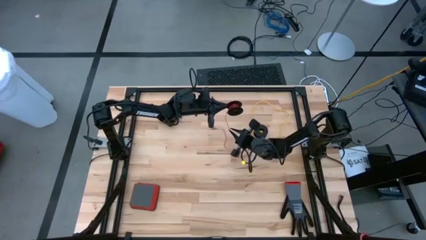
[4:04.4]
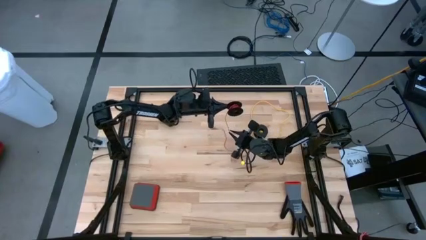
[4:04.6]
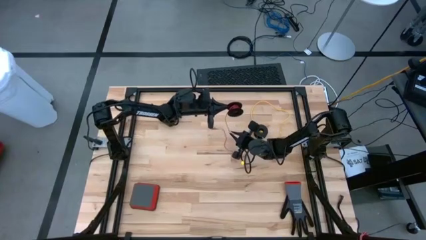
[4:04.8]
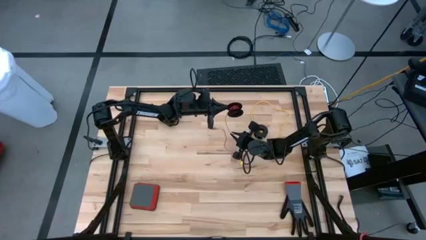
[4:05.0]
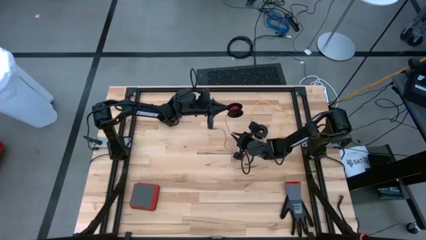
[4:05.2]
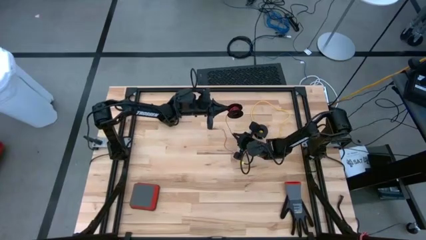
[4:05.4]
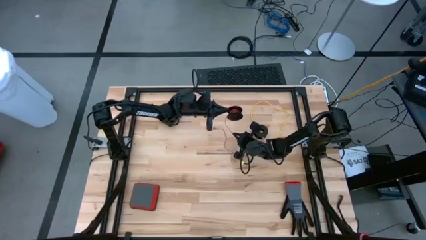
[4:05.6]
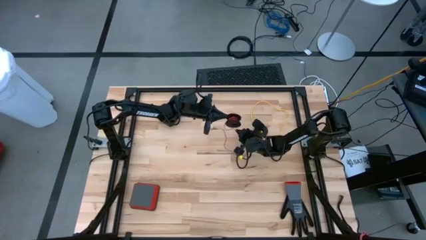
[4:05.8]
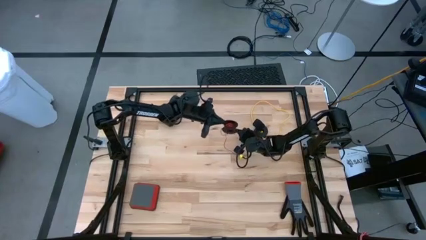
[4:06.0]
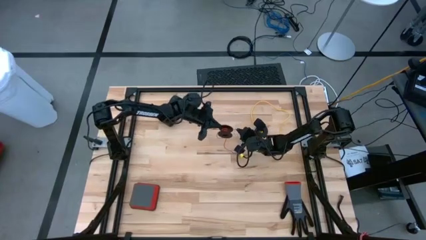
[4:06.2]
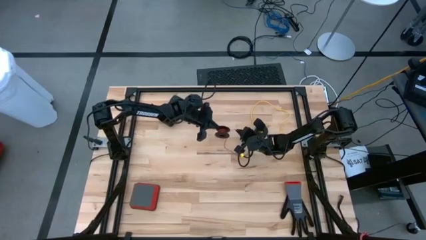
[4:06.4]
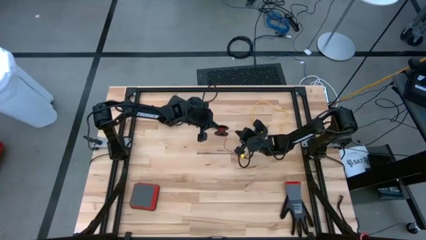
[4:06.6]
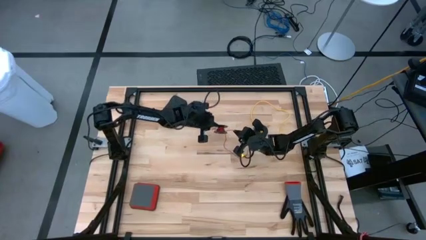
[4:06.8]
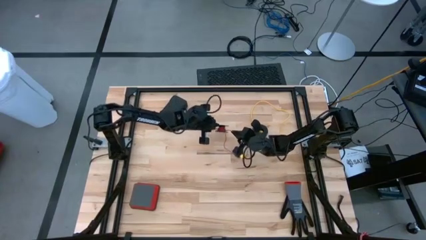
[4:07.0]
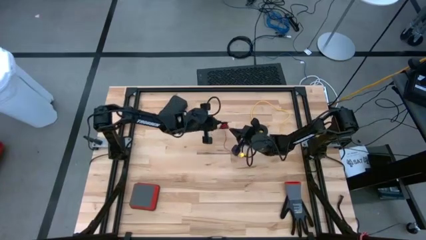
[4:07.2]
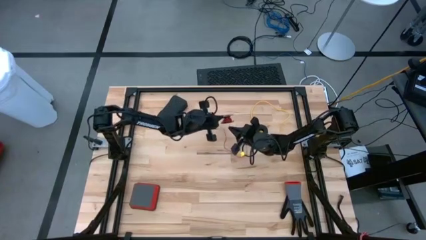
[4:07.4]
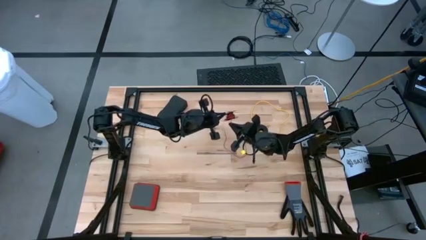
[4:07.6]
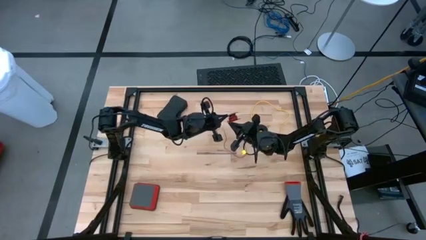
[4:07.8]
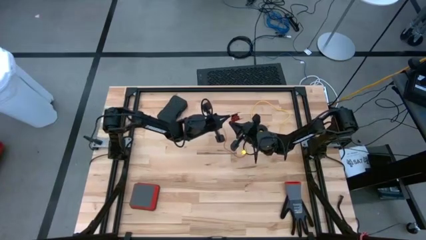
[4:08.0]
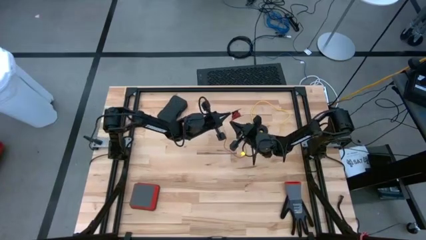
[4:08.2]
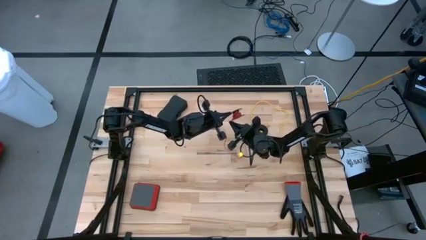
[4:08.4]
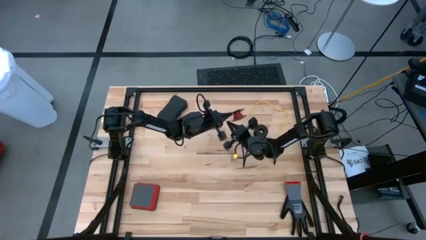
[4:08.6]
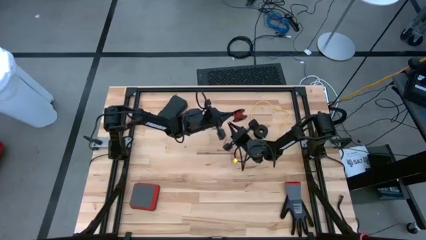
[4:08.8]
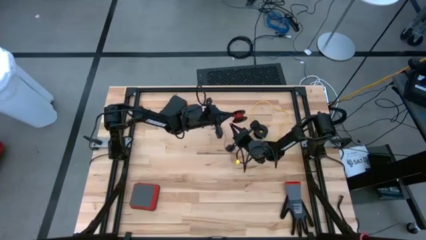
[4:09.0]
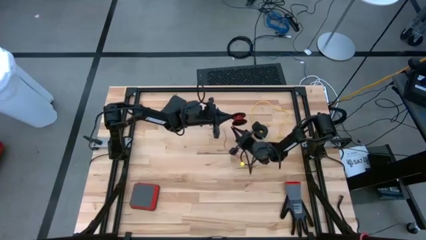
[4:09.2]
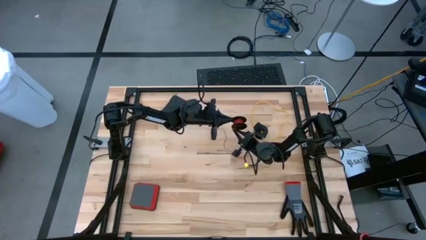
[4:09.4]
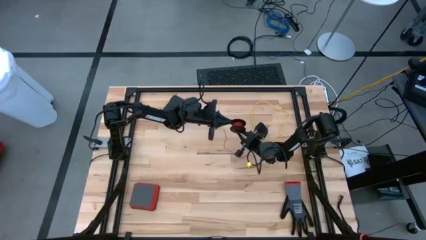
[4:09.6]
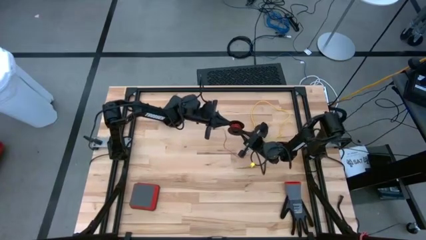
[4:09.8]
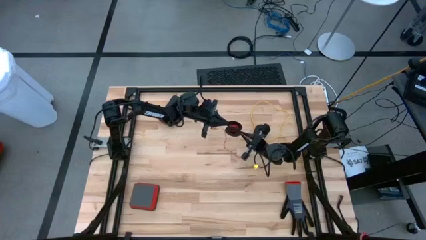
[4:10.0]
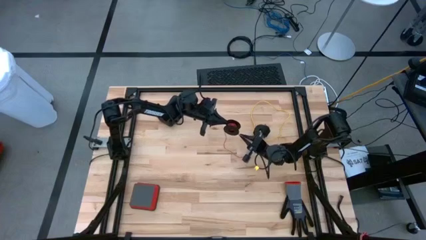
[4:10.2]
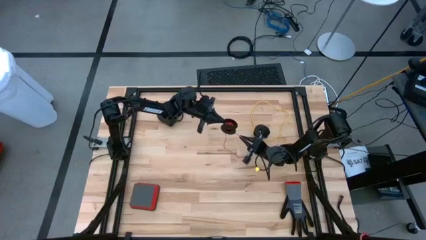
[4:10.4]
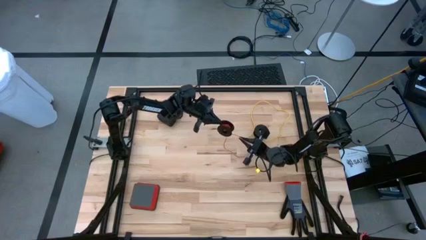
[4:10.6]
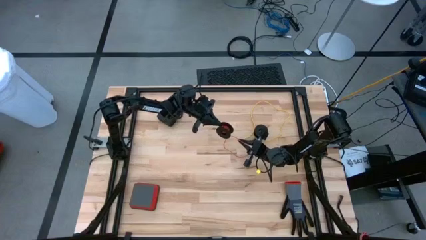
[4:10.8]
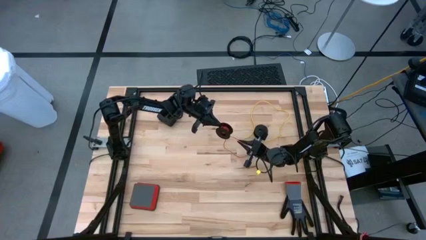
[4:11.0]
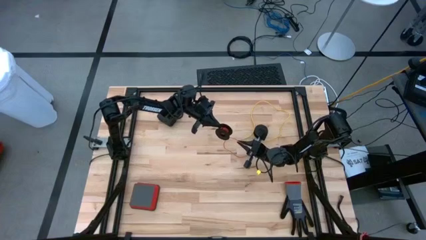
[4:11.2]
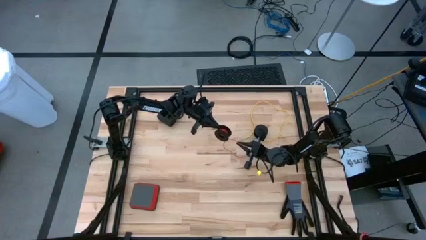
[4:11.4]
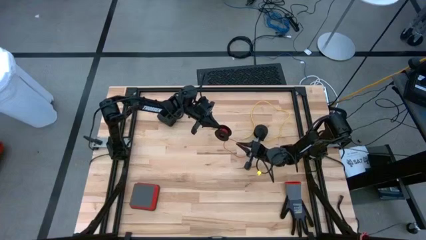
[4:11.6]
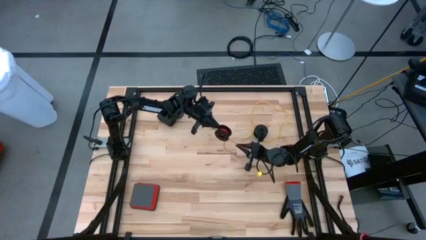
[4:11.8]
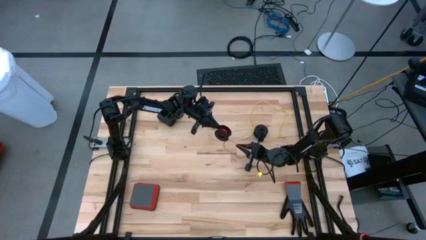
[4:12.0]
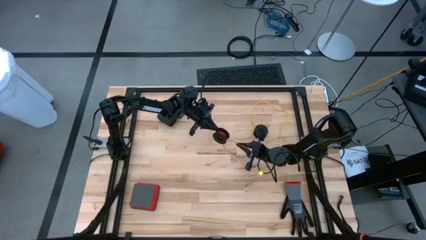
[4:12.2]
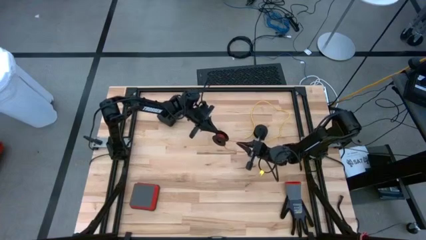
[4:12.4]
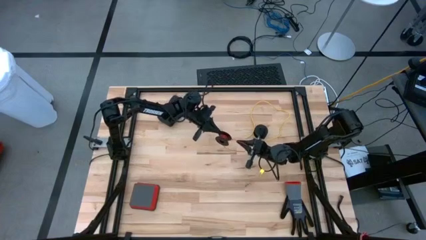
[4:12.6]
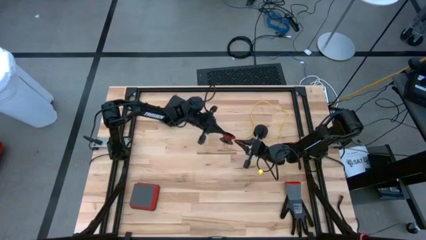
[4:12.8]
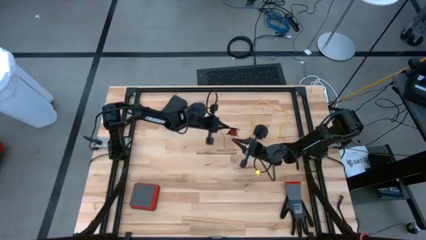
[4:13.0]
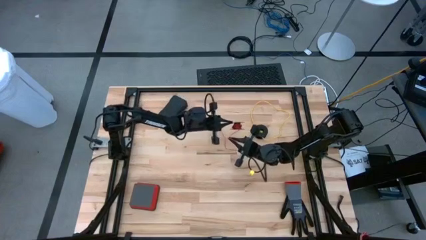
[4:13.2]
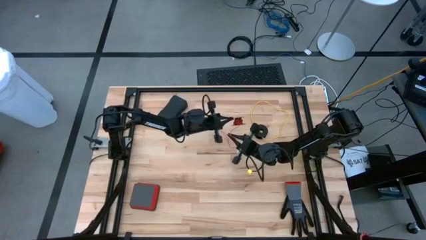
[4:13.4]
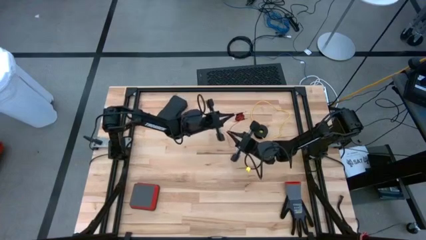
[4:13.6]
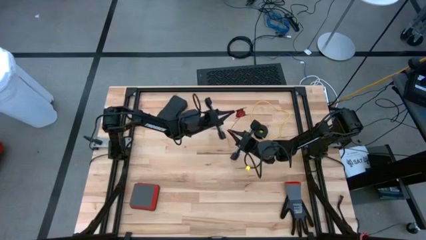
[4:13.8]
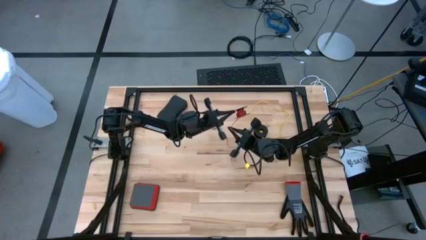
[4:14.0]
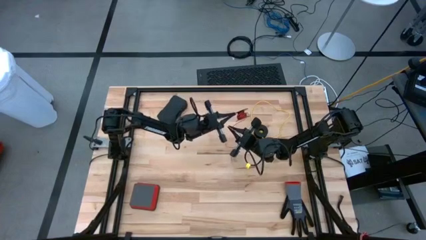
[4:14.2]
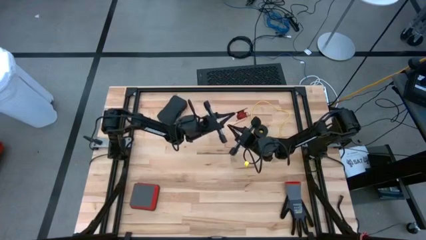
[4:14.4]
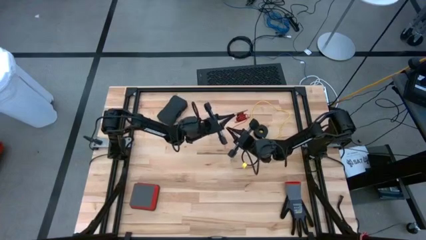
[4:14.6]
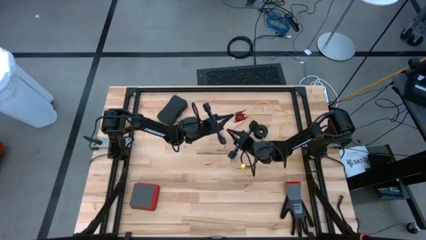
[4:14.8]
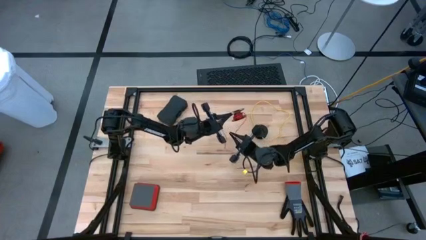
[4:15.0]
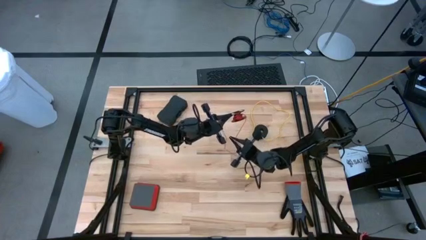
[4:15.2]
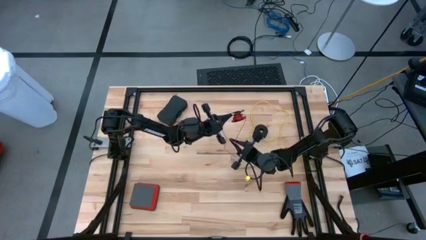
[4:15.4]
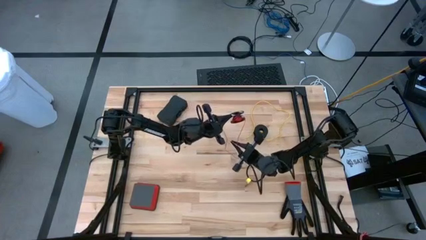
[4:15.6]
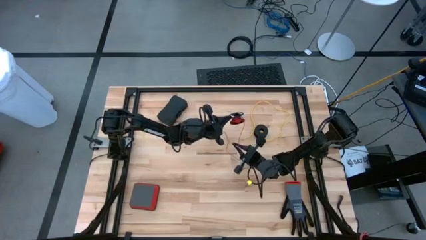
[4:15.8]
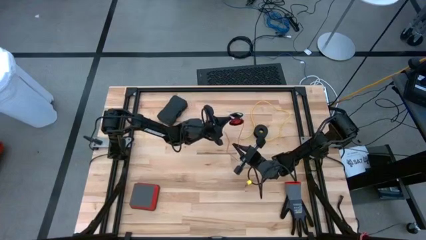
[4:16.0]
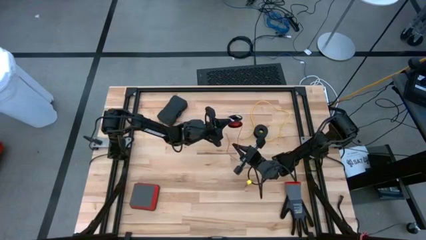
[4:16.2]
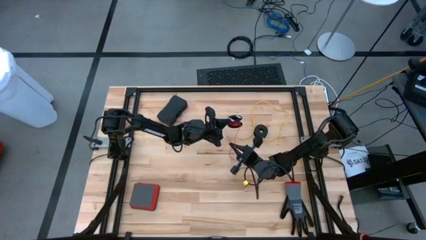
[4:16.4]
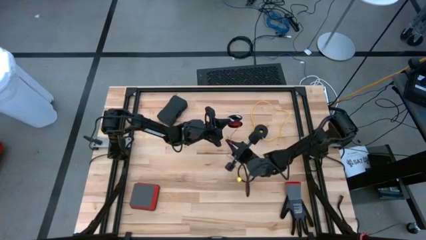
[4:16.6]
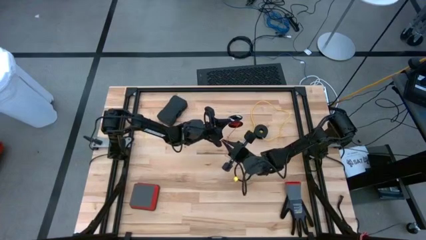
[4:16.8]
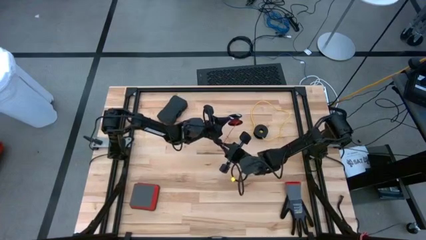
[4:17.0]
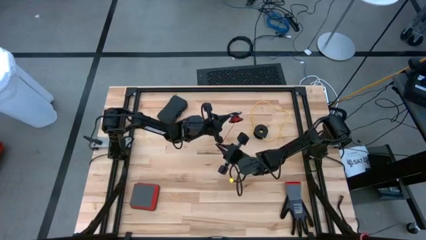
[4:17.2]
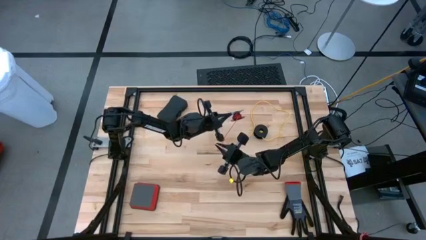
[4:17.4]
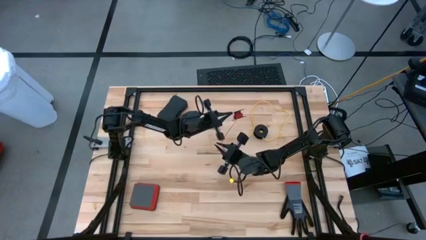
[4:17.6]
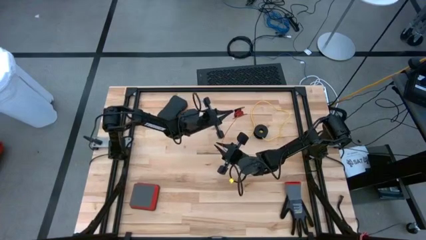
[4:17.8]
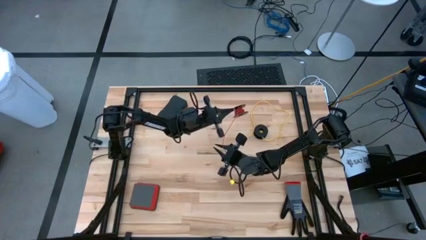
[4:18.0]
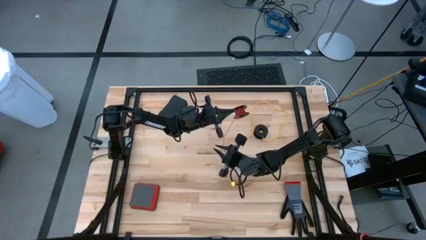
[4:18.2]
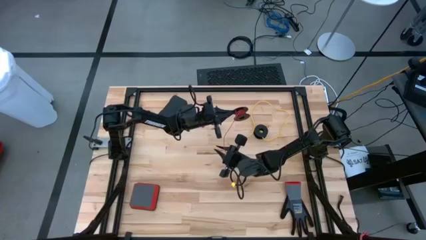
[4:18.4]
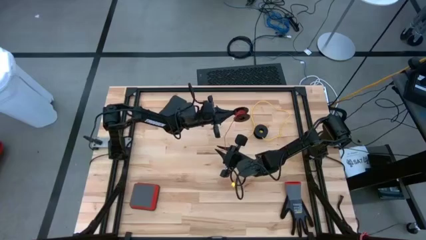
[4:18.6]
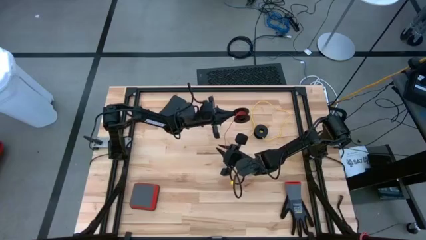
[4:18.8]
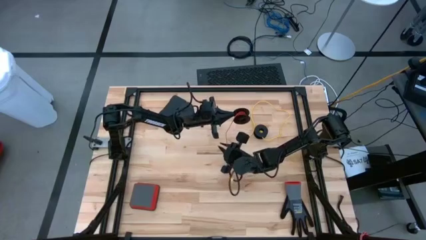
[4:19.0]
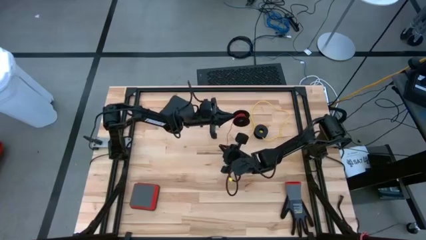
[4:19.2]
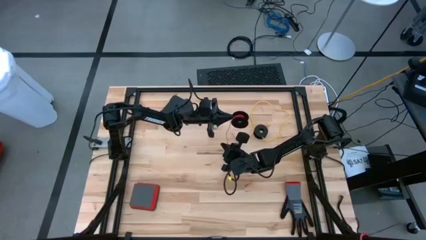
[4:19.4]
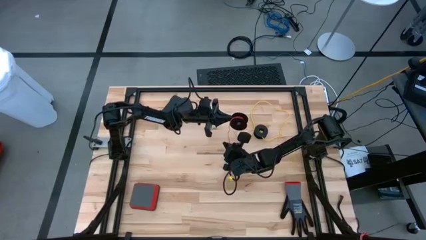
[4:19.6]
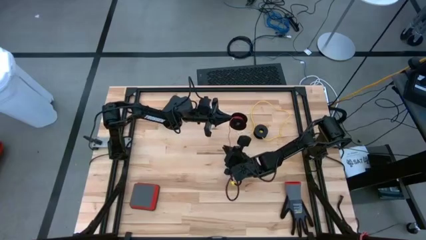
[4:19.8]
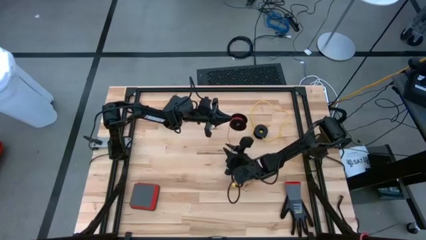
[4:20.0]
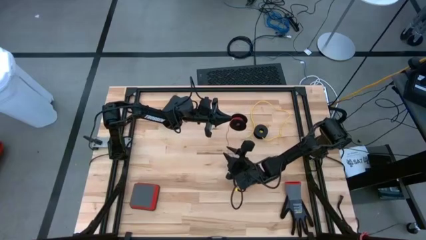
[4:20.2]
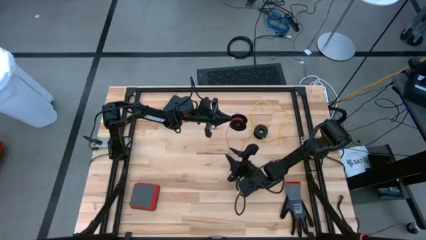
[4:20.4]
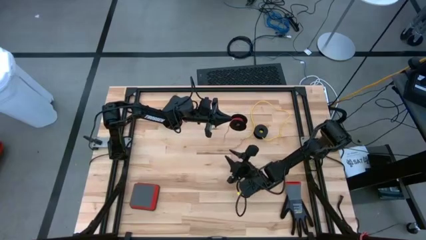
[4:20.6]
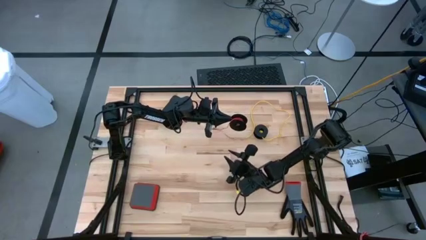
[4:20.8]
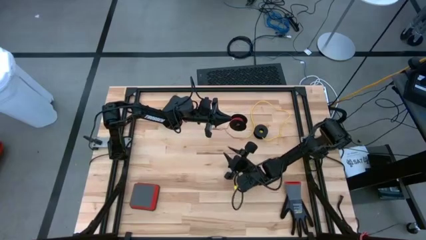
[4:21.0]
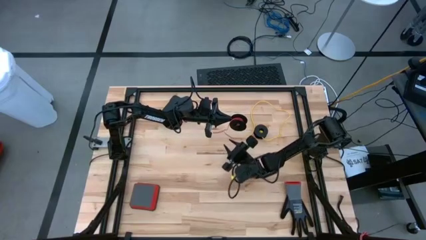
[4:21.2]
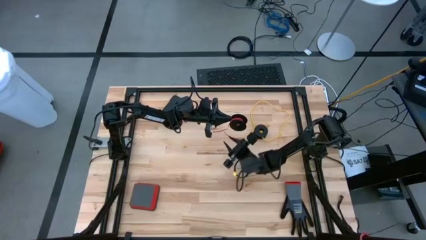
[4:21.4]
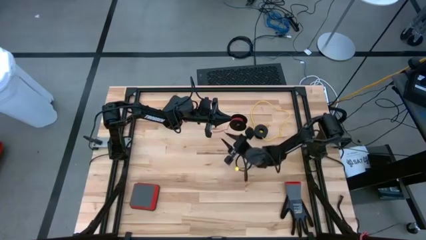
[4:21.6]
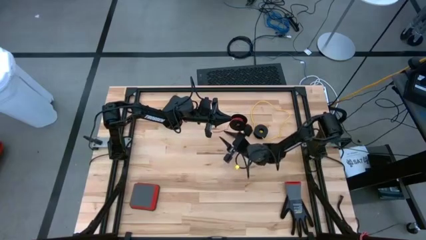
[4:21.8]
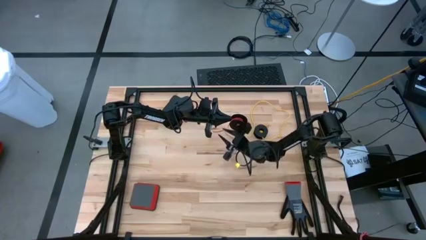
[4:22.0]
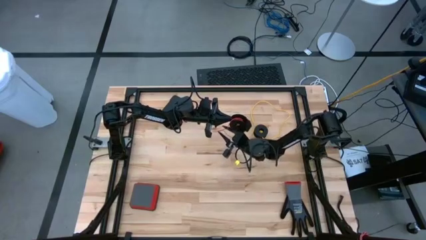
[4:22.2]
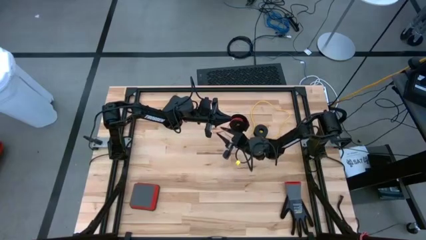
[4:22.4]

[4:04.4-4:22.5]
Task: Coil cords
Coil the red wire onto the black spool
